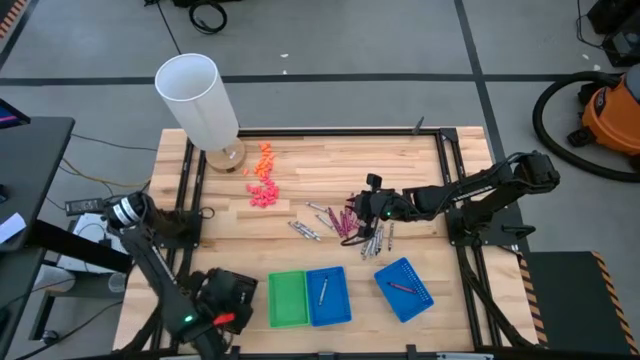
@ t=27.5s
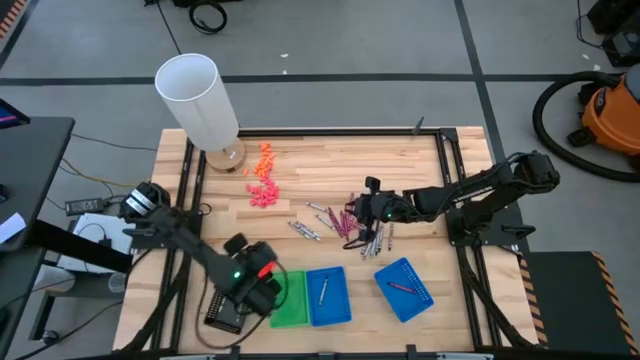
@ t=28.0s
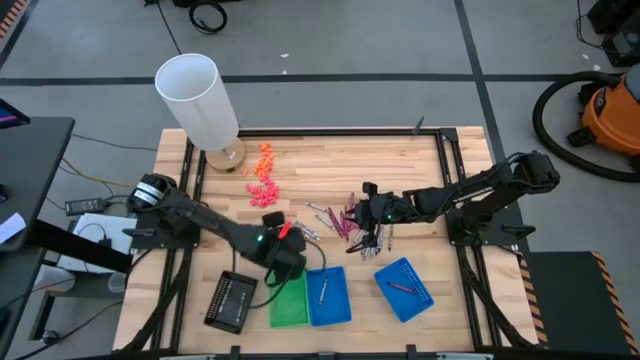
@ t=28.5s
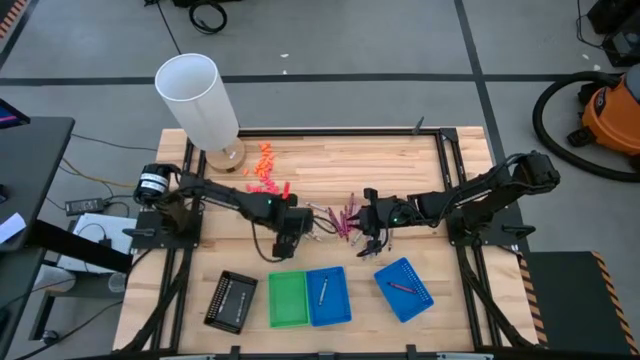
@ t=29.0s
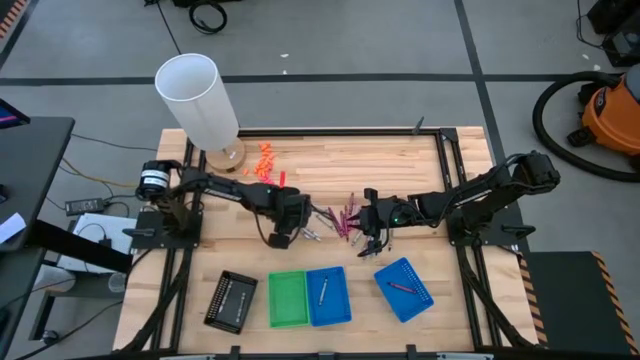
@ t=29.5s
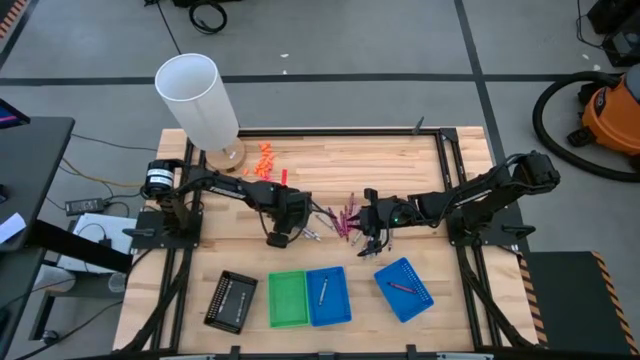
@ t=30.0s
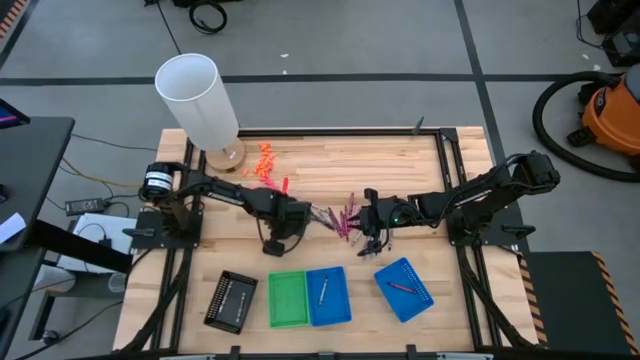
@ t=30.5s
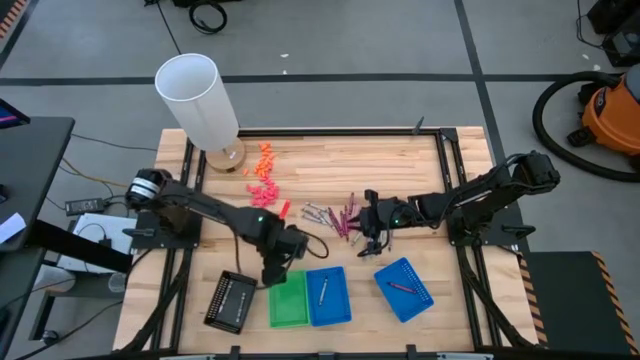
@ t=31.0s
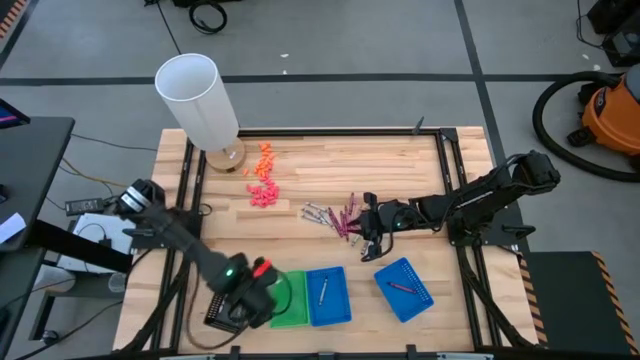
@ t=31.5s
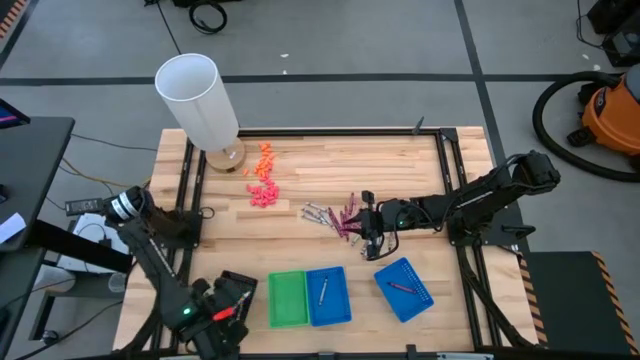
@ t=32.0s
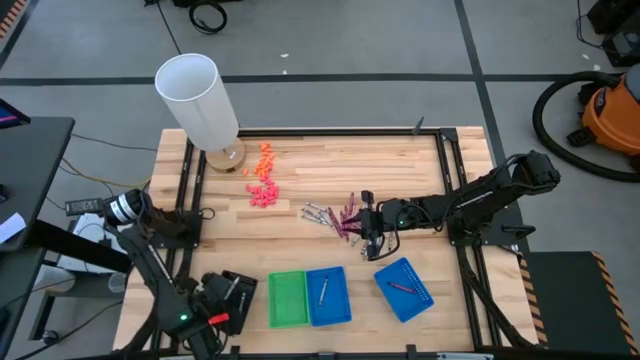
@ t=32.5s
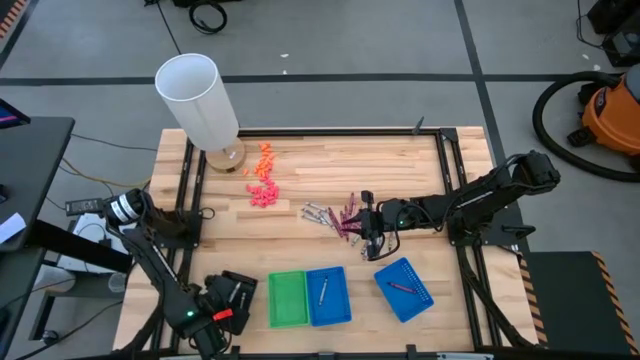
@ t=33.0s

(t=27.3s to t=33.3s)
Task: Sort crayons
Put the white crayon into the black bin

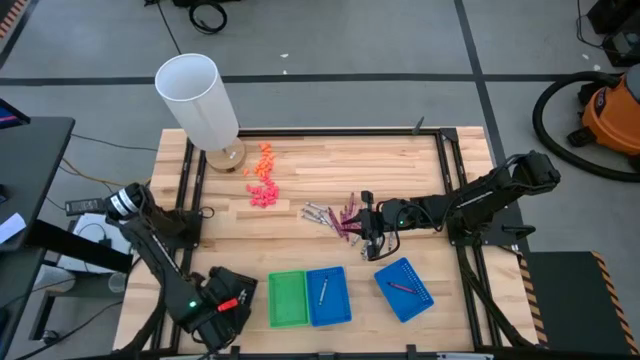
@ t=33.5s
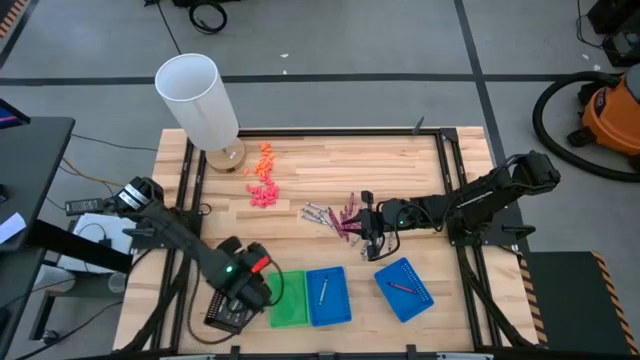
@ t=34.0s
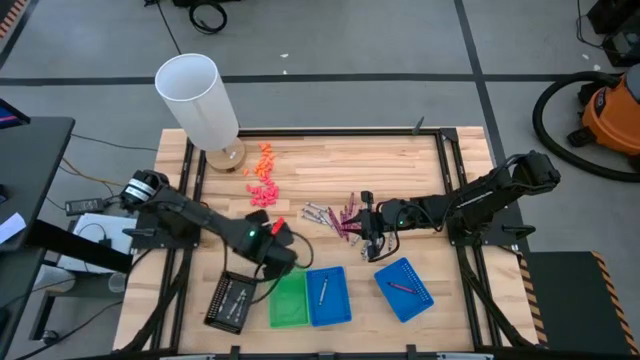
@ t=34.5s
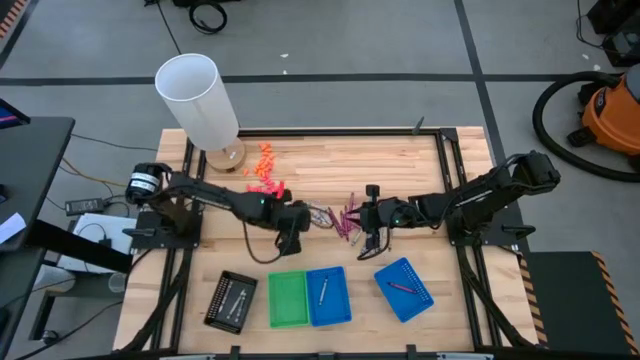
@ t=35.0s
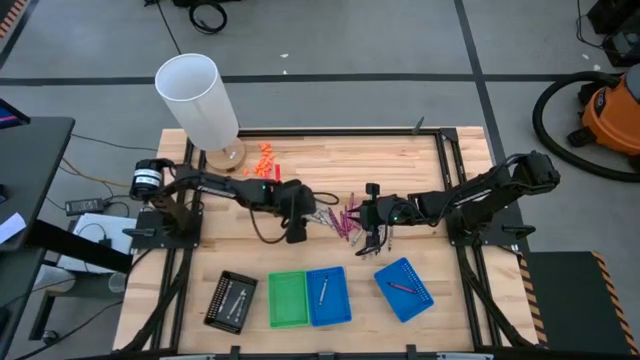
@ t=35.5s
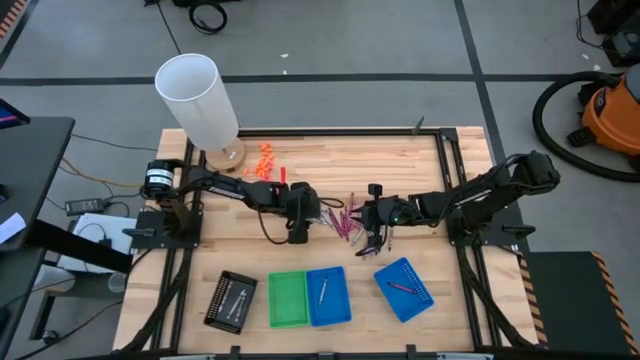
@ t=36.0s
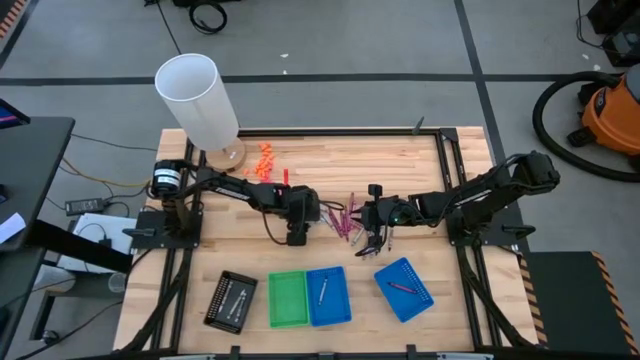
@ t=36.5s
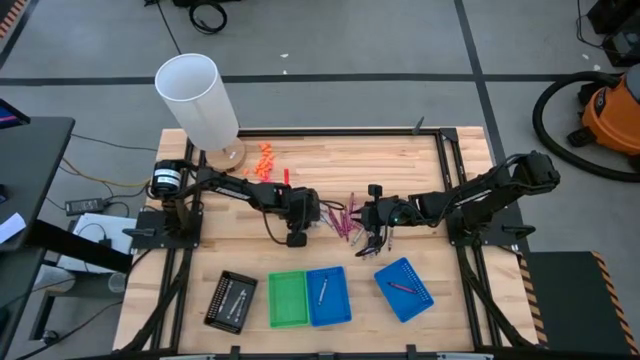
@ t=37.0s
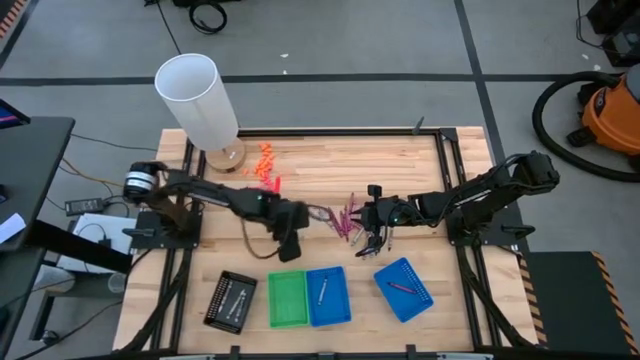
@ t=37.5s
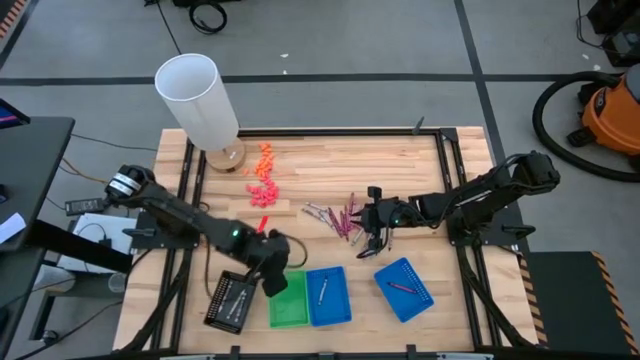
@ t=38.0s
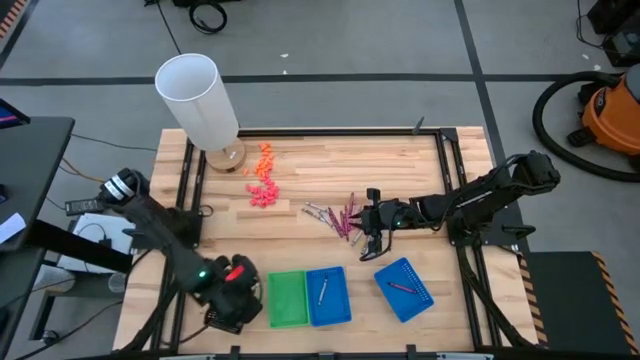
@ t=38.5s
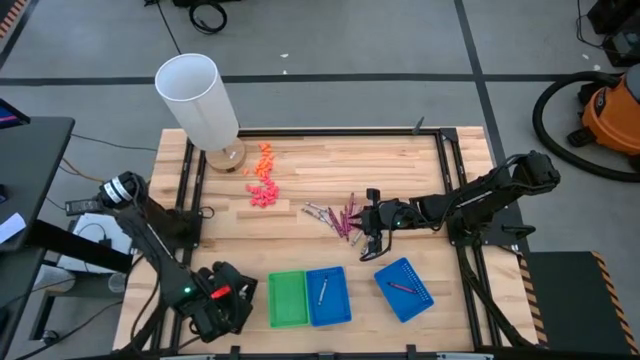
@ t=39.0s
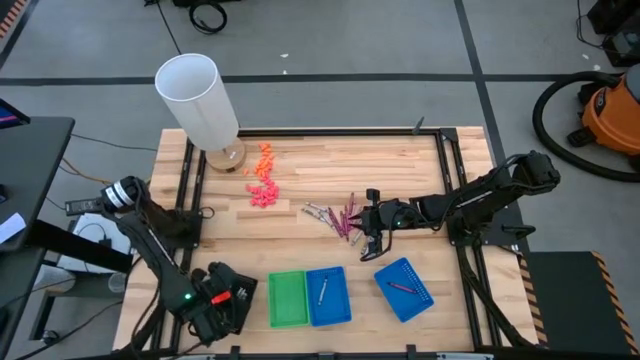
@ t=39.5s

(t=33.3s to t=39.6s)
Put the white crayon into the black bin

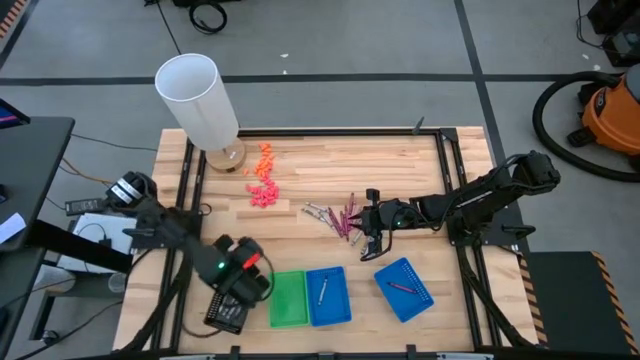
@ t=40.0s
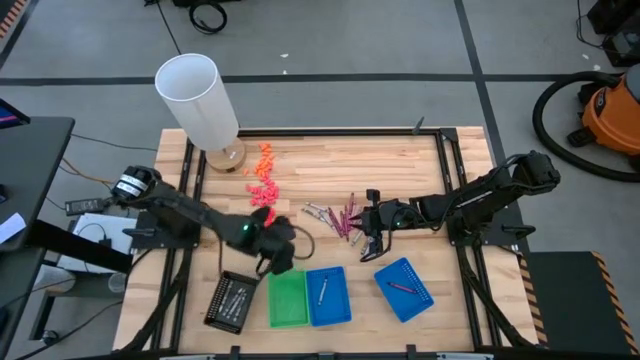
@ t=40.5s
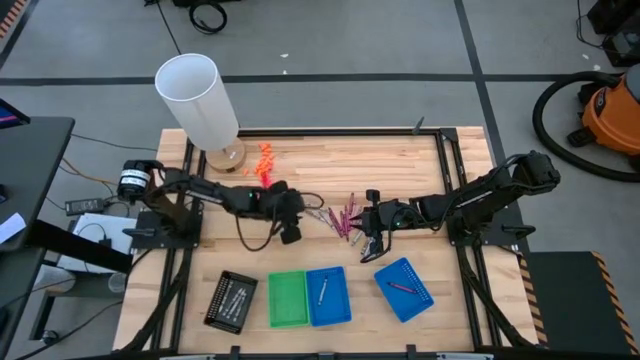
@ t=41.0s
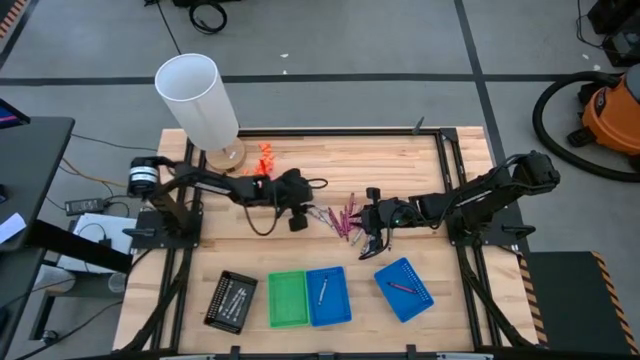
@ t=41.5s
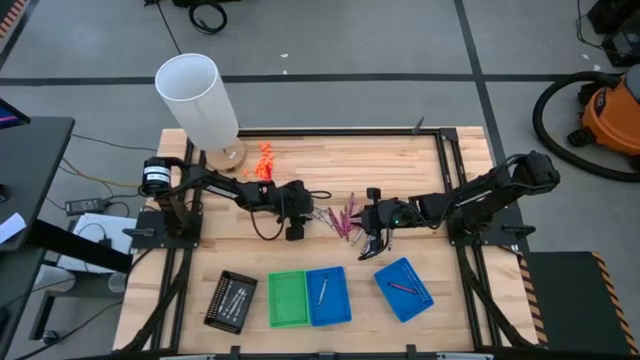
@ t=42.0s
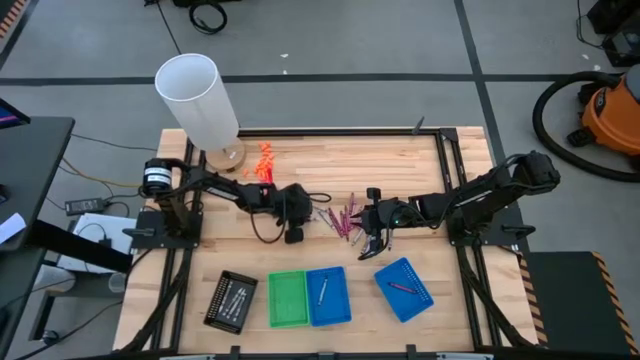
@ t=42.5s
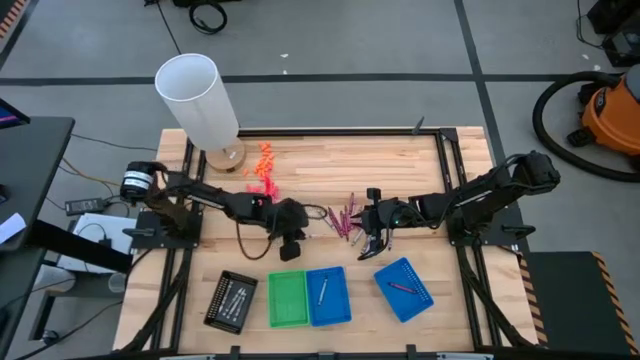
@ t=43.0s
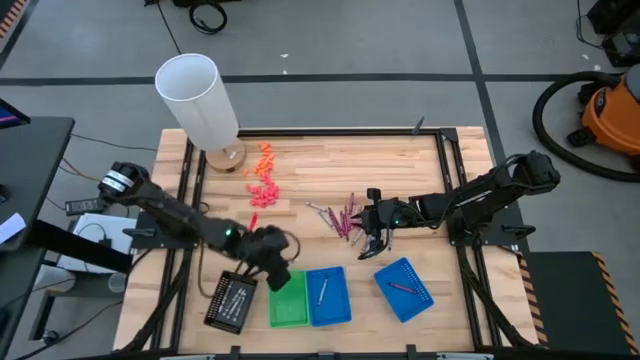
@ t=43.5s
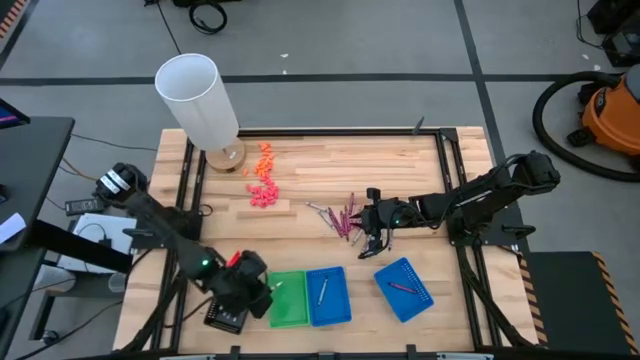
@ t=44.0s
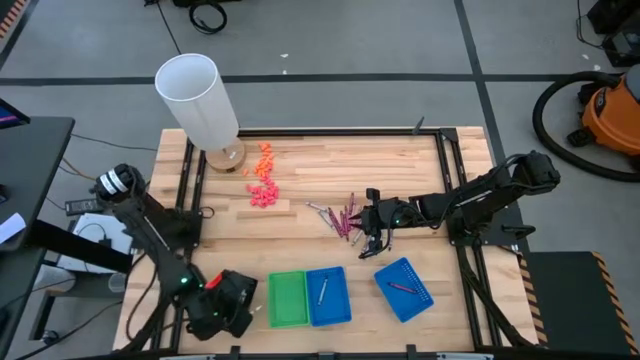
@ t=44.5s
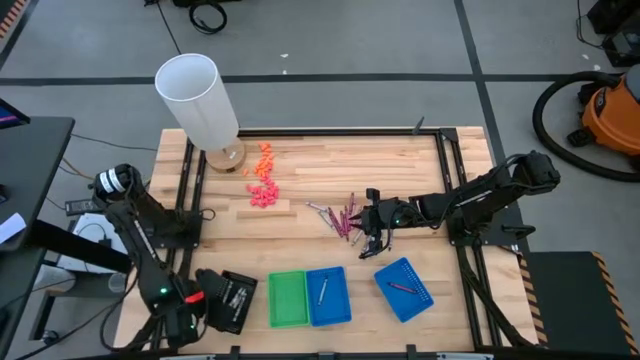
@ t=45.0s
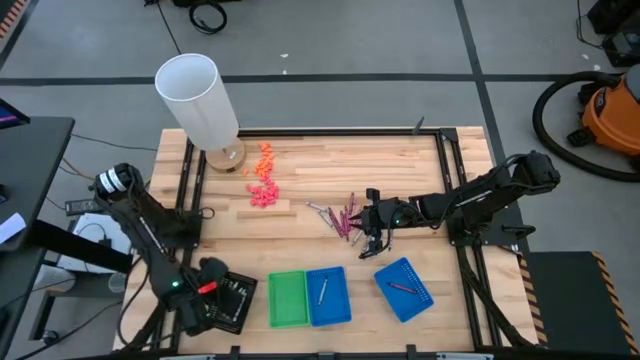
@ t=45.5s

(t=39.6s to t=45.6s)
Put the white crayon into the black bin

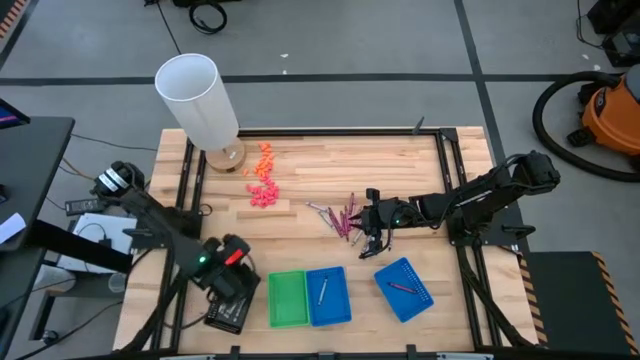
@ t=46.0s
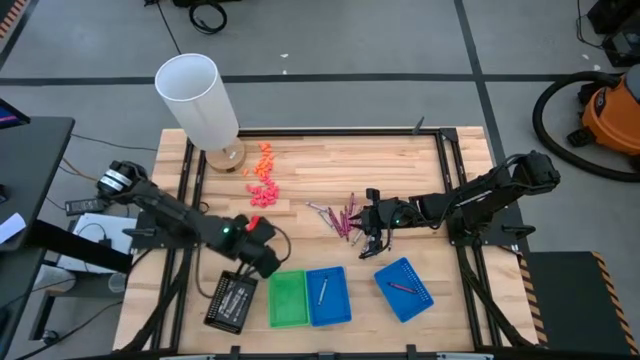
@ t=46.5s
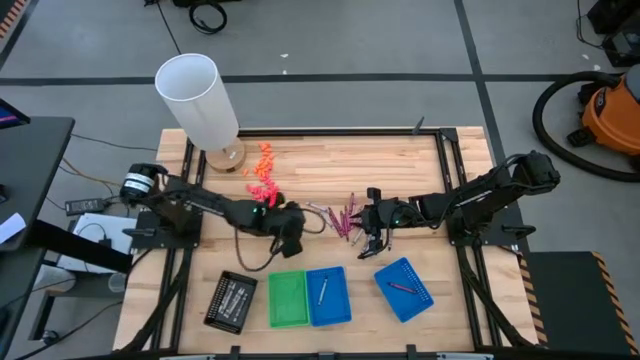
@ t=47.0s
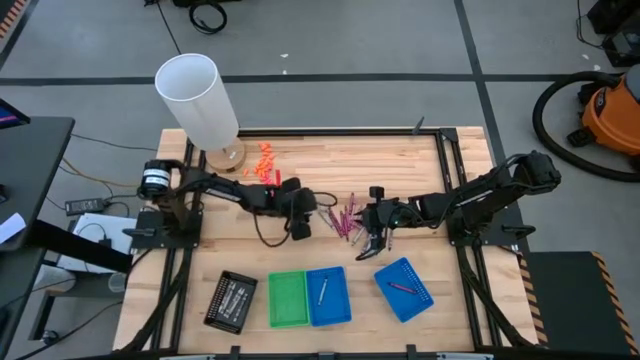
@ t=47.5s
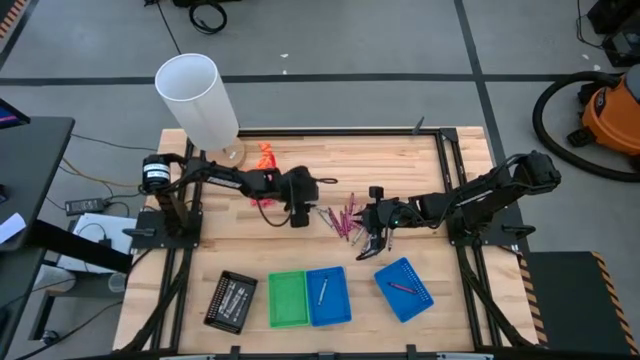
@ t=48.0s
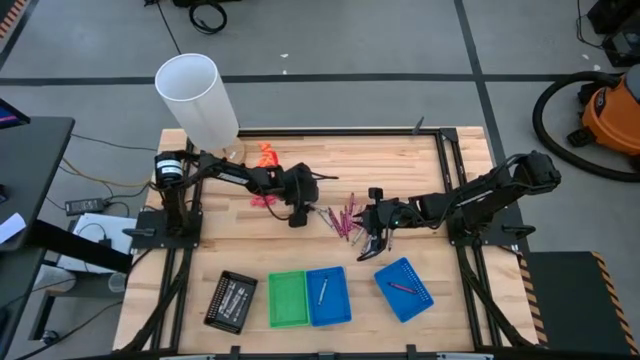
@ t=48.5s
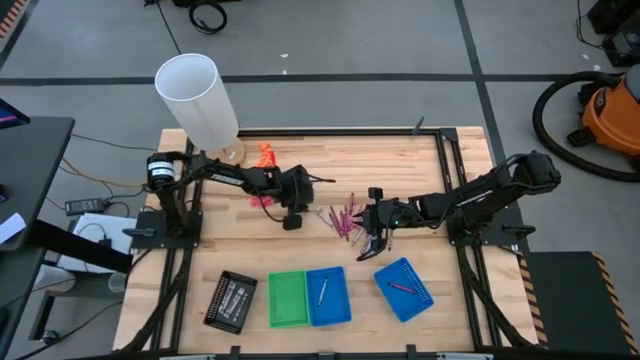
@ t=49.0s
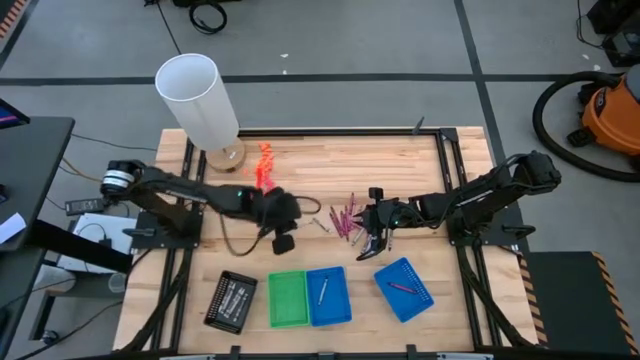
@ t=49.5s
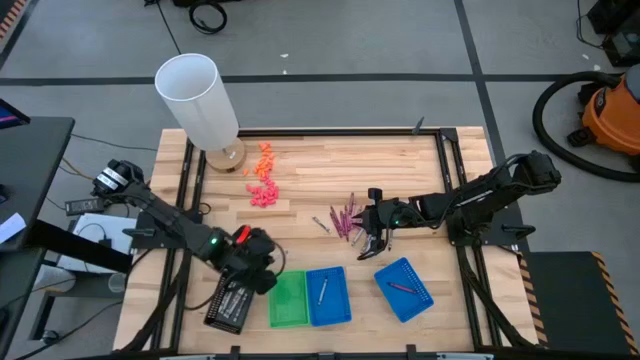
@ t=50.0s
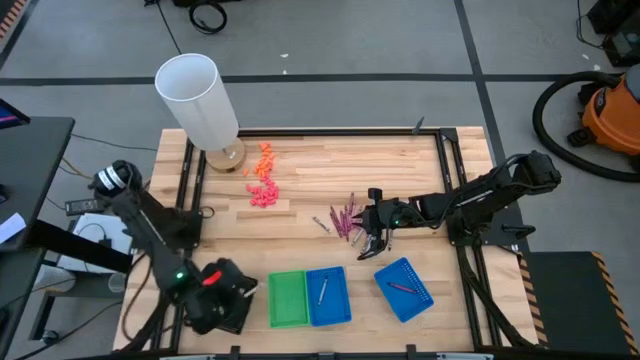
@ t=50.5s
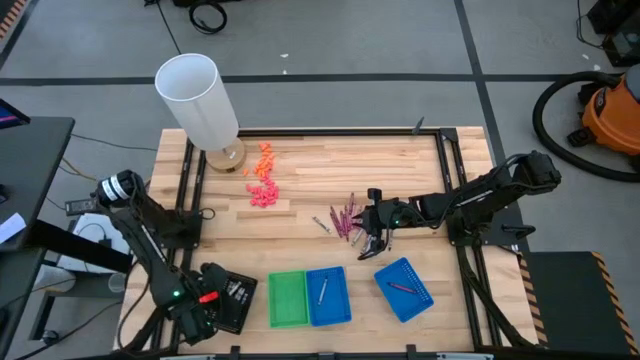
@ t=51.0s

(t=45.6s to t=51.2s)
Put the white crayon into the black bin
